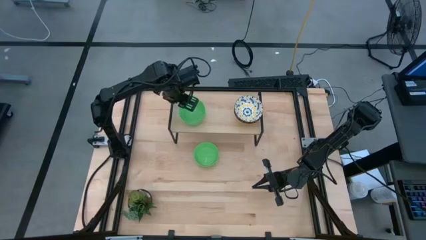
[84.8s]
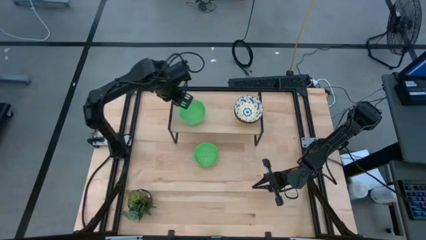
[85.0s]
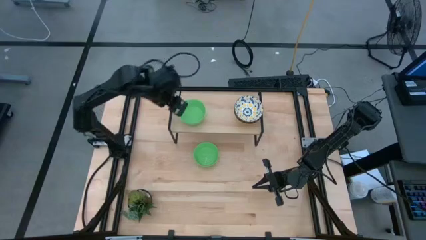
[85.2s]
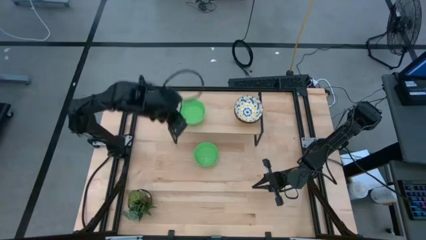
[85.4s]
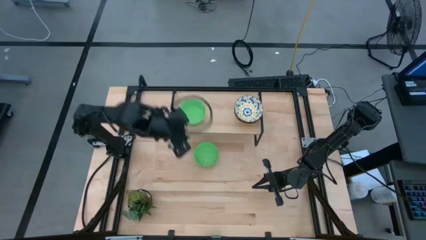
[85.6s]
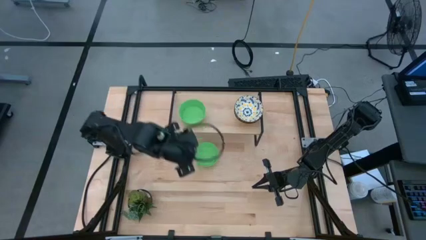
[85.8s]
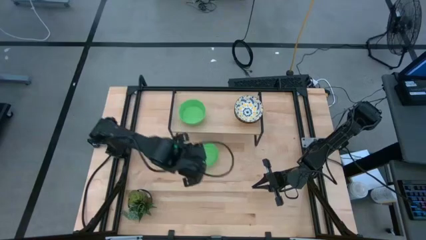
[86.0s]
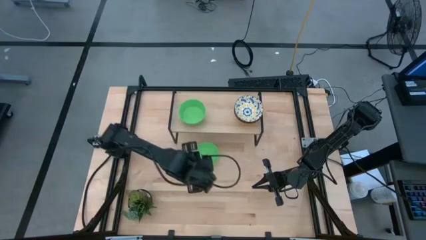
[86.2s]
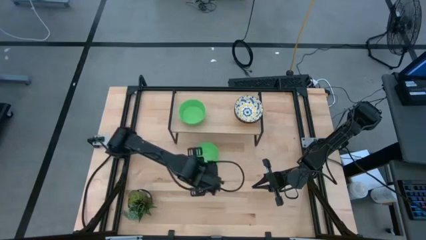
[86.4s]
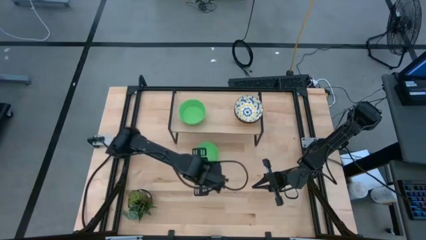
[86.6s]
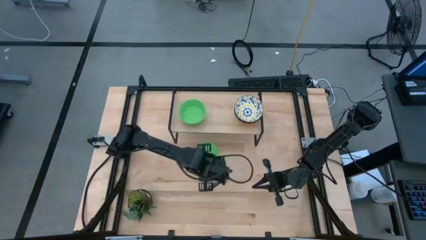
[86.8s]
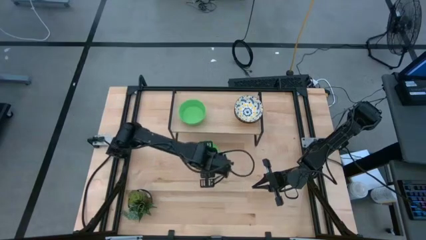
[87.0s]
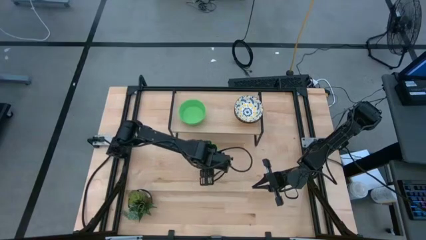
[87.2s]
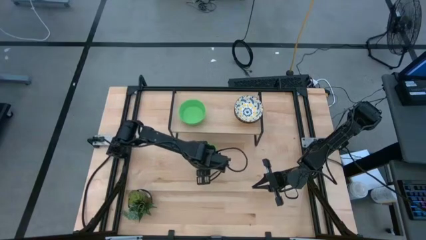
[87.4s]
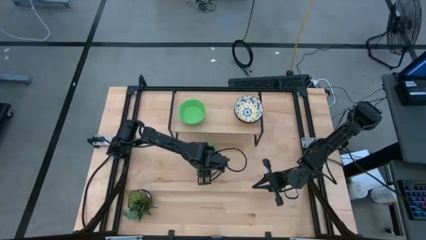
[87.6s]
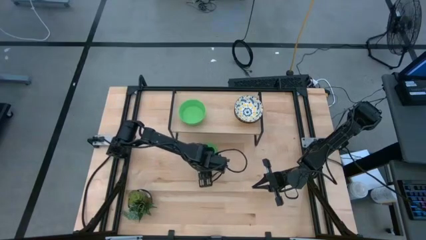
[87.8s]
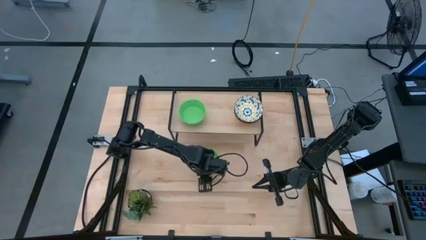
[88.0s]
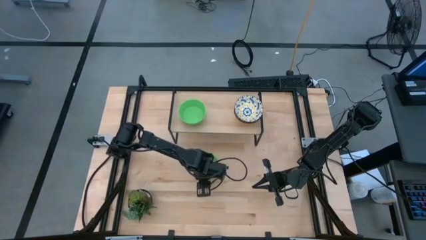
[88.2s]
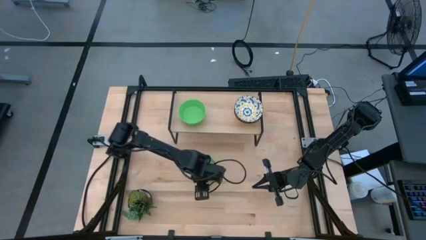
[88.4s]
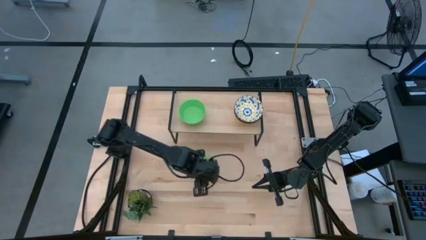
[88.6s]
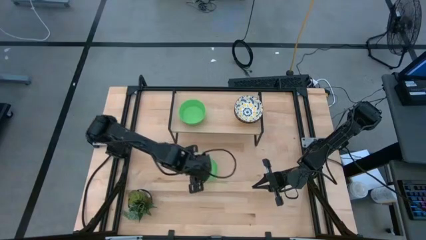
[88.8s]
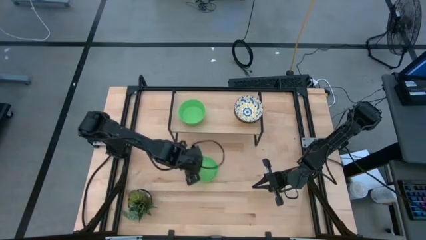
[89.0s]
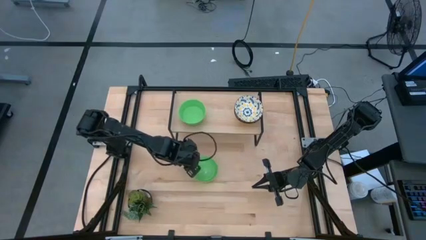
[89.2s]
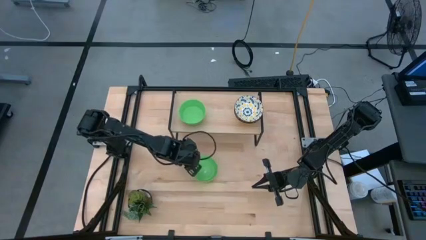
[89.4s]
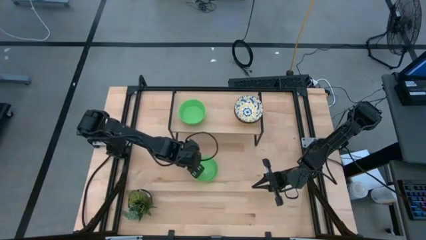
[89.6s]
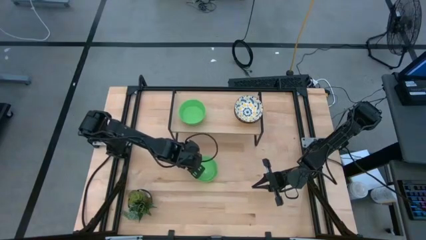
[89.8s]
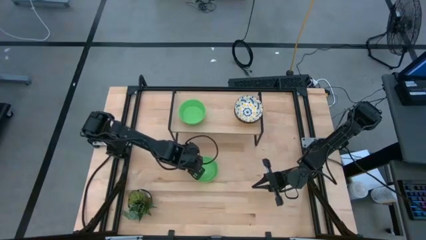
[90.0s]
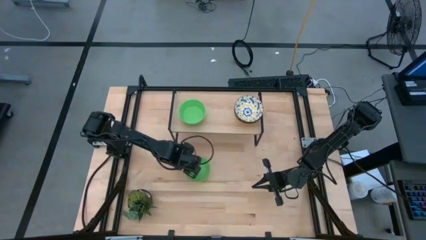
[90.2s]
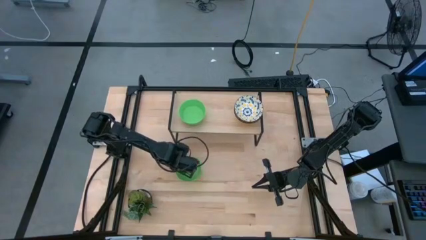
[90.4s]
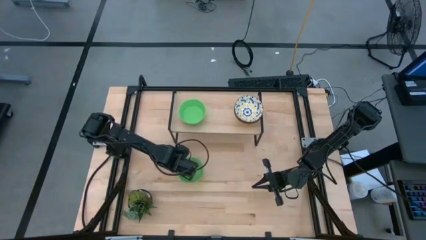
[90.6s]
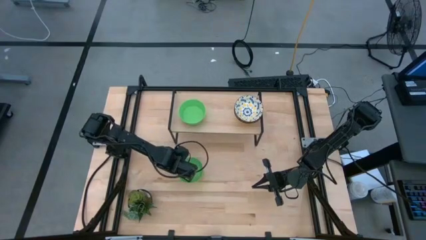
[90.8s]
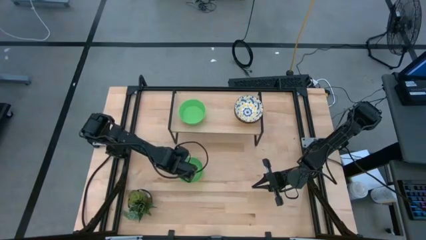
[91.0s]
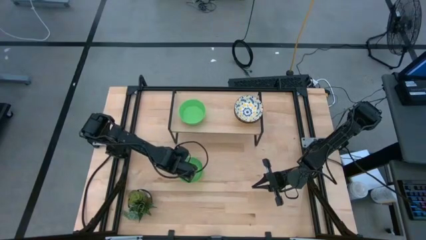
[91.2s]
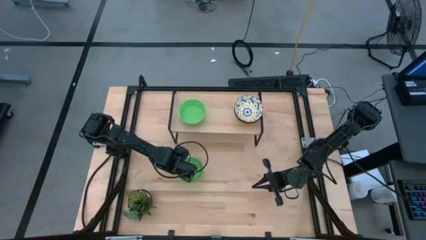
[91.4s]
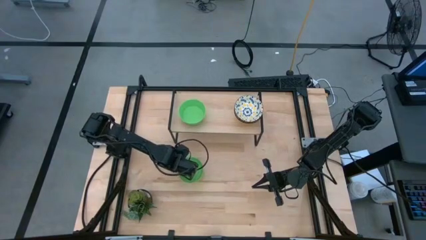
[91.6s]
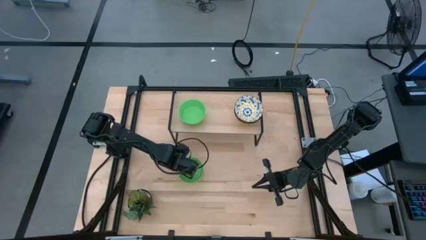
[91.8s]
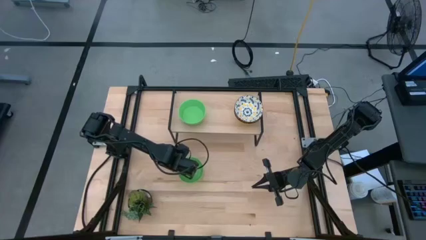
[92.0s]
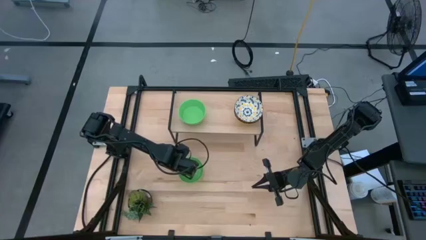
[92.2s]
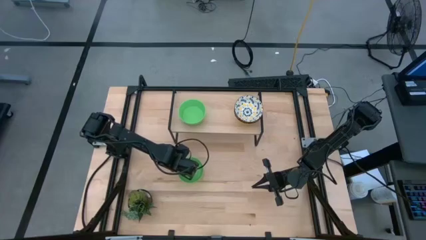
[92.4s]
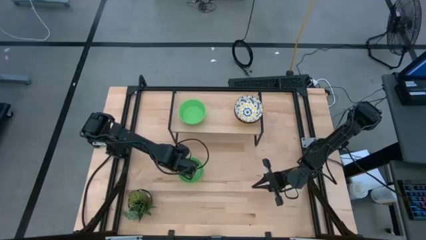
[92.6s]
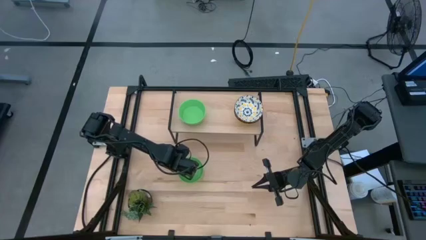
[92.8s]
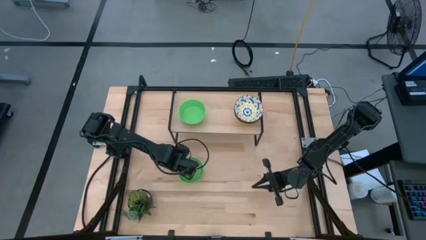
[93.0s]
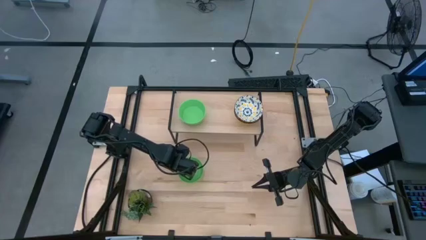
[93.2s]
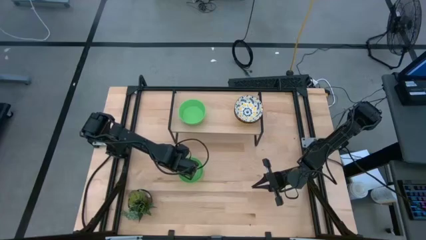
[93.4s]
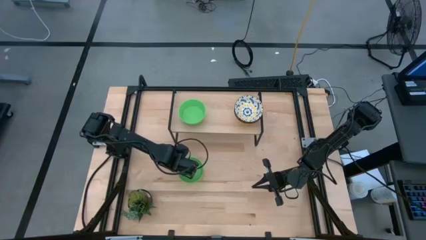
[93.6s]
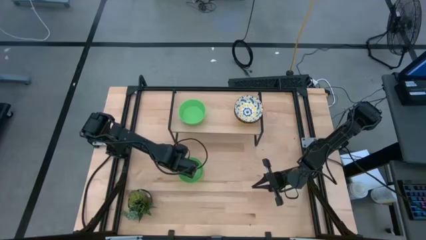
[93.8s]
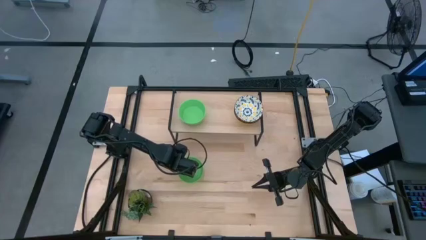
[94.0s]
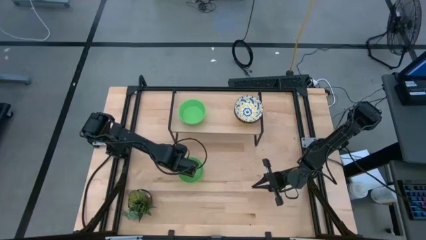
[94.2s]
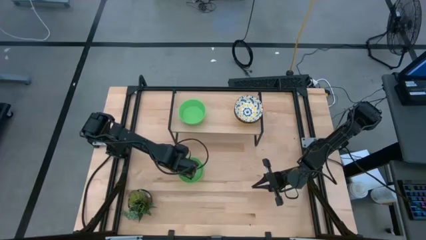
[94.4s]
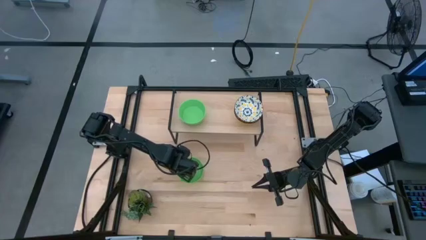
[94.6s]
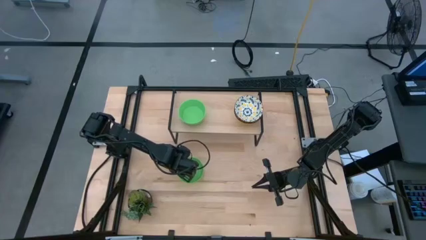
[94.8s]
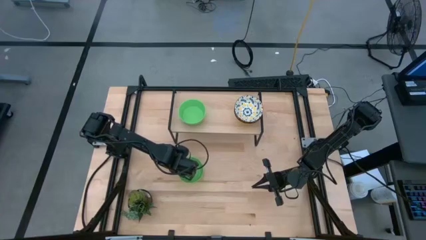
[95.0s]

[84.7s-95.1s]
Task: Pick & Place Mini bowls
Stack the green bowl on top of the green bowl on the shelf
